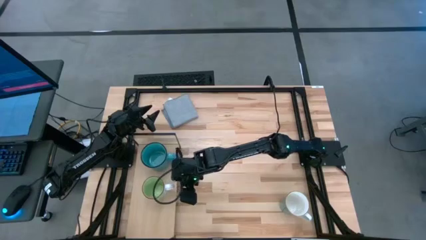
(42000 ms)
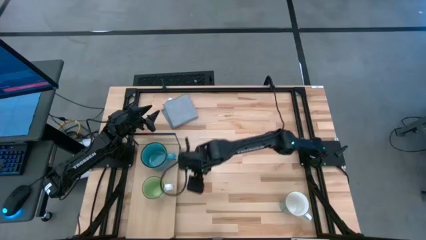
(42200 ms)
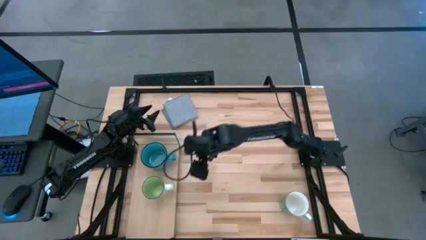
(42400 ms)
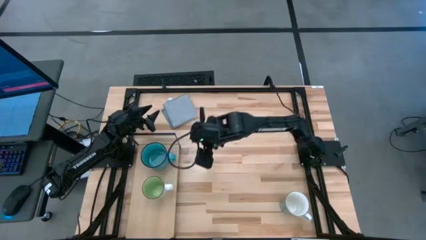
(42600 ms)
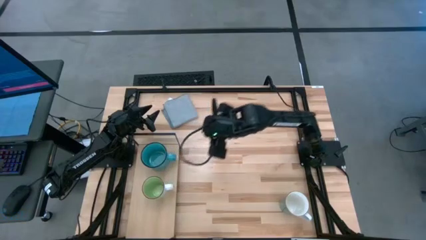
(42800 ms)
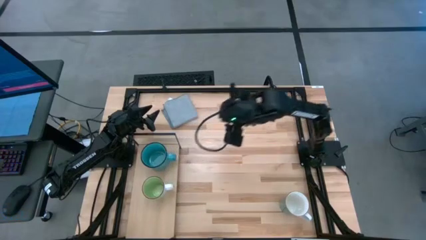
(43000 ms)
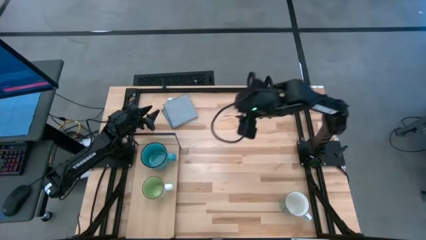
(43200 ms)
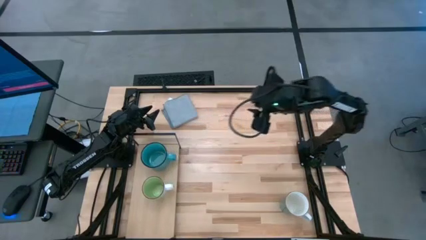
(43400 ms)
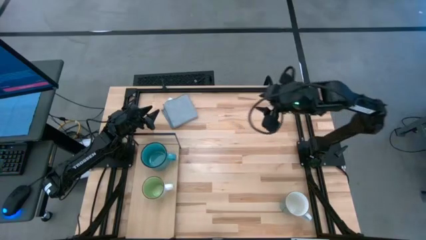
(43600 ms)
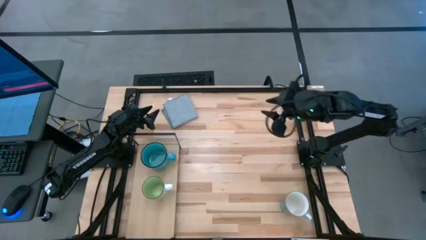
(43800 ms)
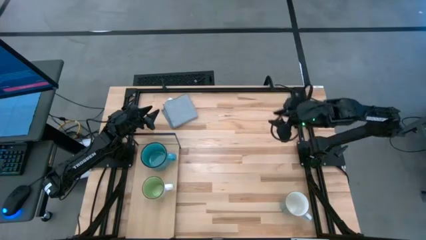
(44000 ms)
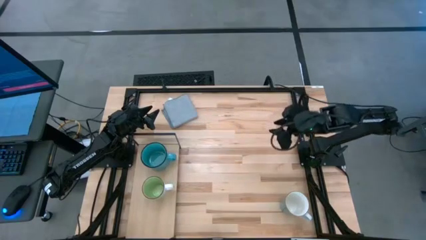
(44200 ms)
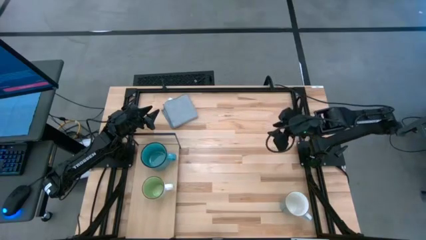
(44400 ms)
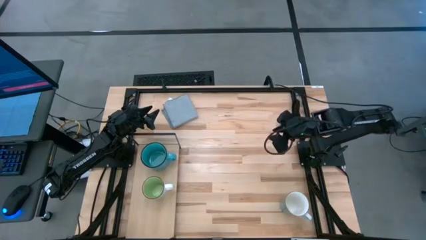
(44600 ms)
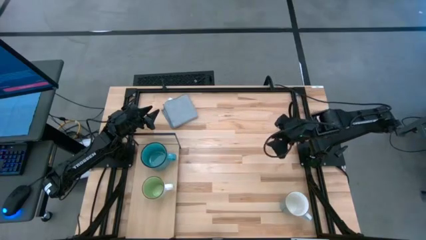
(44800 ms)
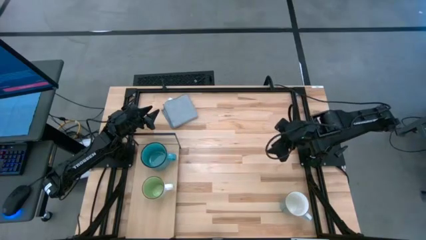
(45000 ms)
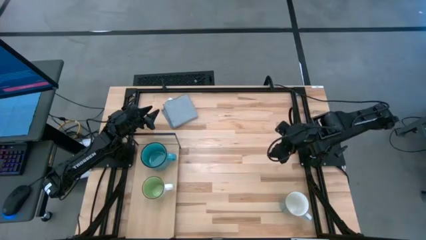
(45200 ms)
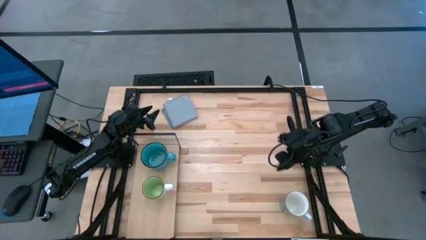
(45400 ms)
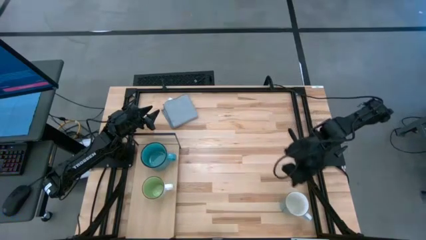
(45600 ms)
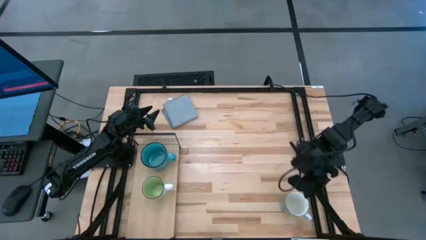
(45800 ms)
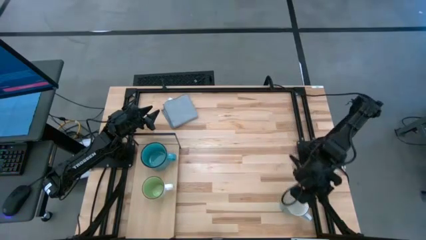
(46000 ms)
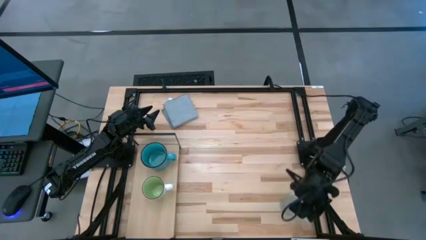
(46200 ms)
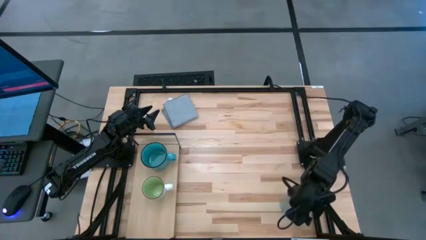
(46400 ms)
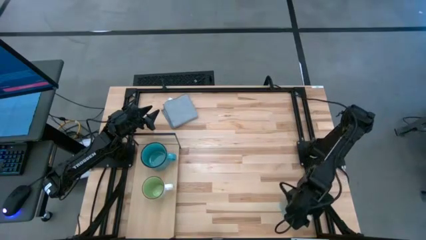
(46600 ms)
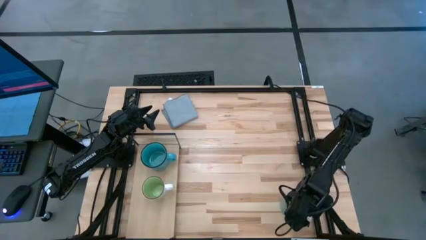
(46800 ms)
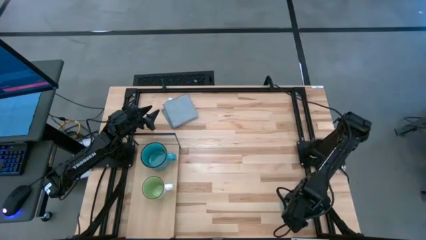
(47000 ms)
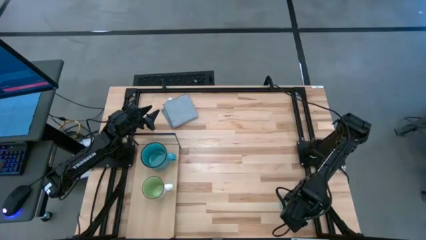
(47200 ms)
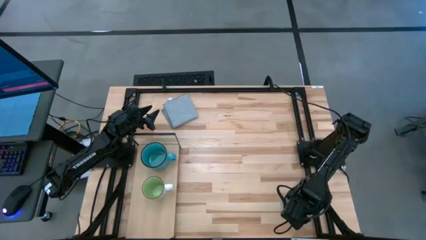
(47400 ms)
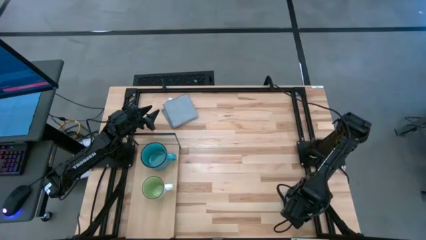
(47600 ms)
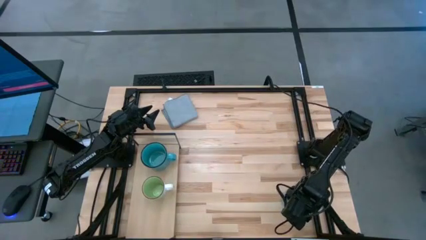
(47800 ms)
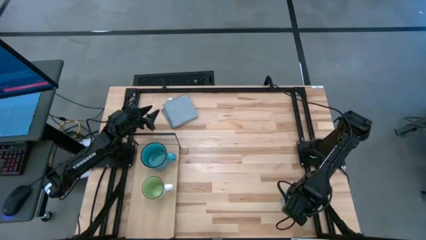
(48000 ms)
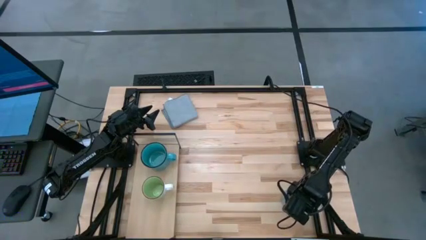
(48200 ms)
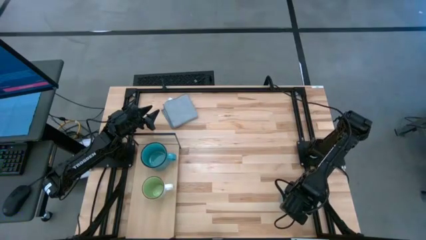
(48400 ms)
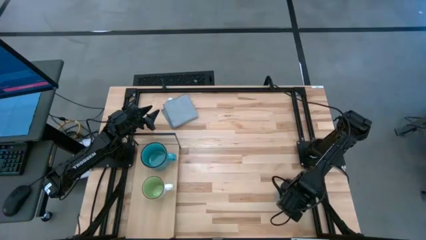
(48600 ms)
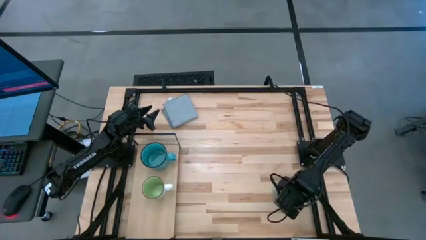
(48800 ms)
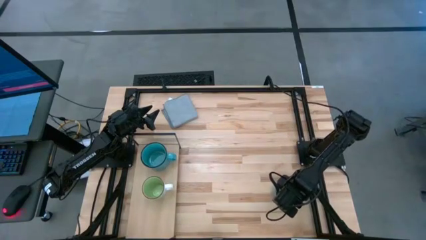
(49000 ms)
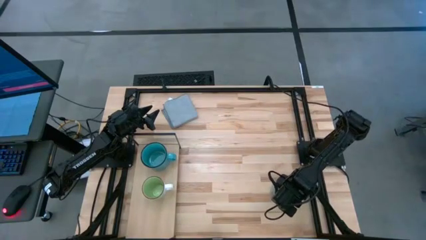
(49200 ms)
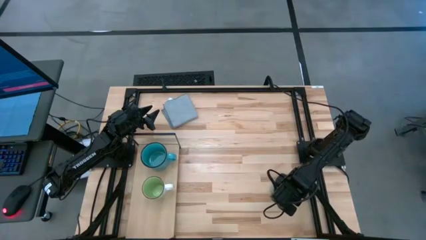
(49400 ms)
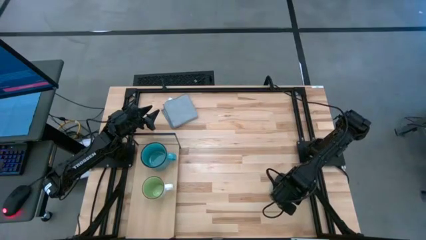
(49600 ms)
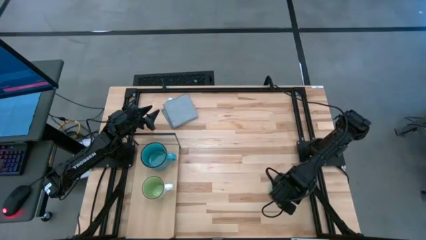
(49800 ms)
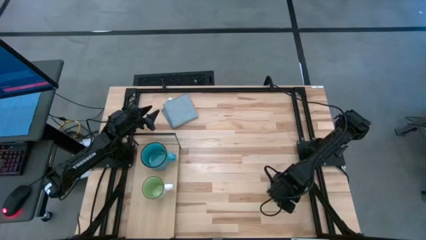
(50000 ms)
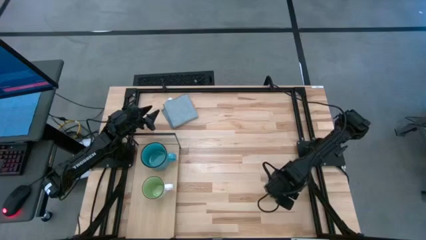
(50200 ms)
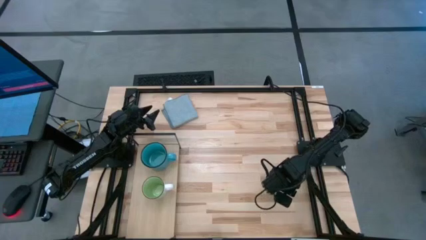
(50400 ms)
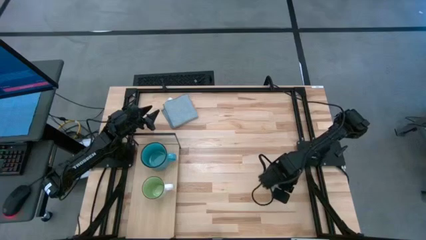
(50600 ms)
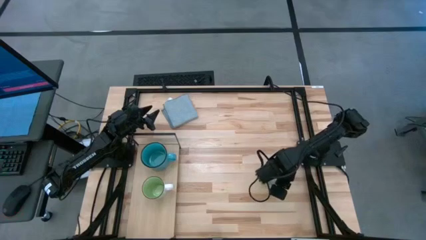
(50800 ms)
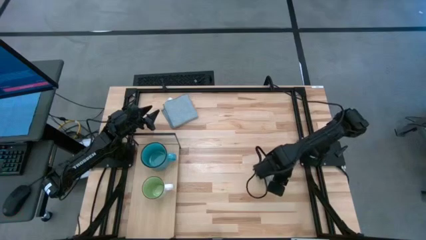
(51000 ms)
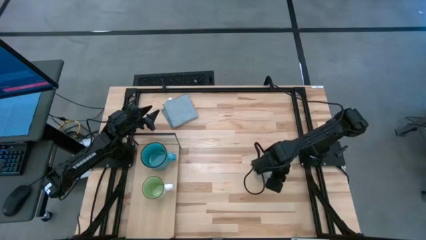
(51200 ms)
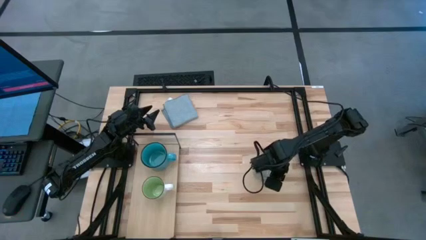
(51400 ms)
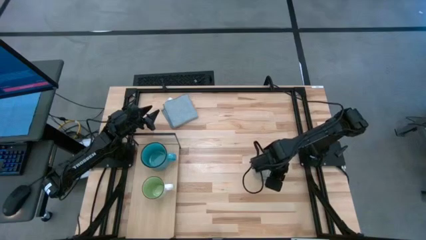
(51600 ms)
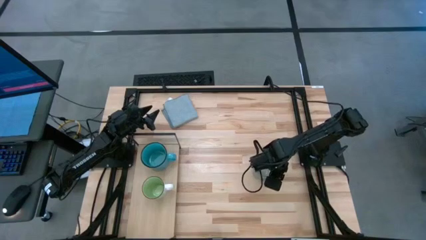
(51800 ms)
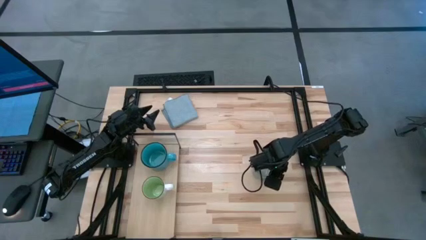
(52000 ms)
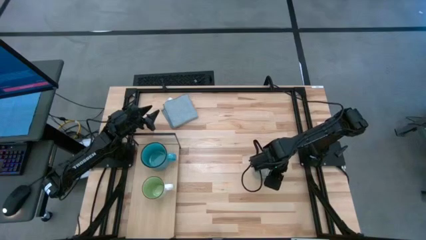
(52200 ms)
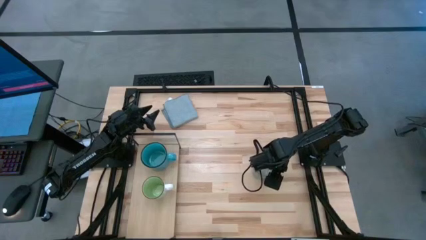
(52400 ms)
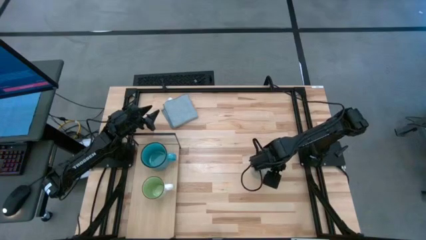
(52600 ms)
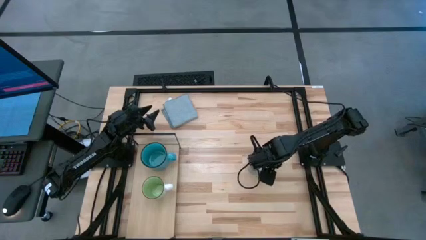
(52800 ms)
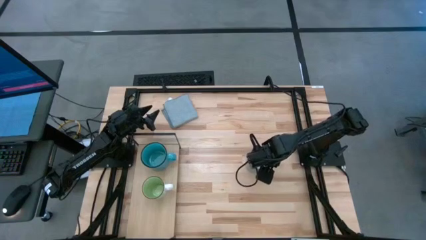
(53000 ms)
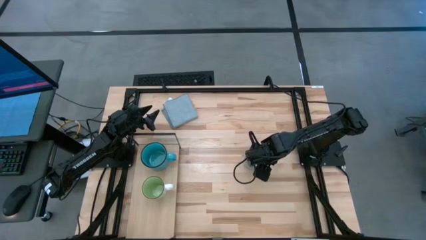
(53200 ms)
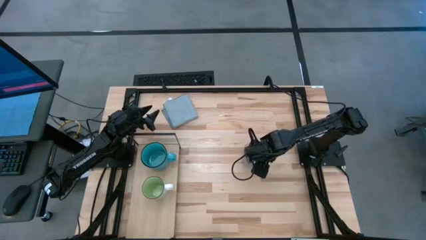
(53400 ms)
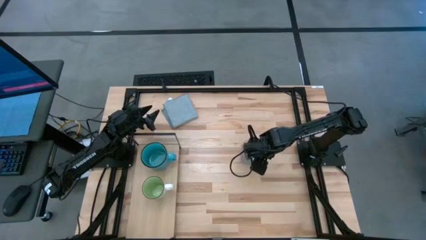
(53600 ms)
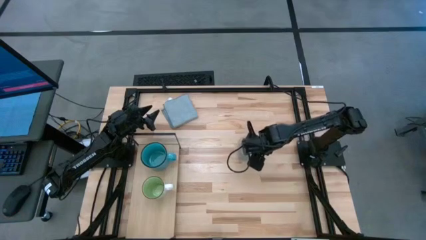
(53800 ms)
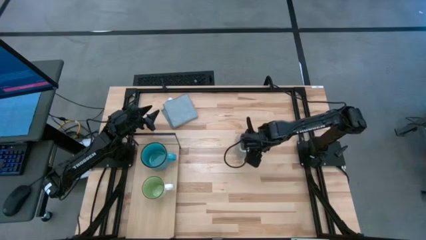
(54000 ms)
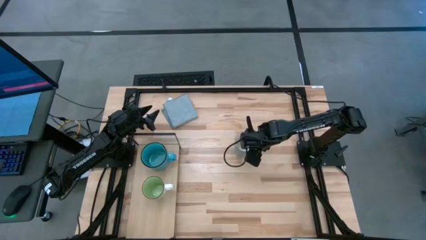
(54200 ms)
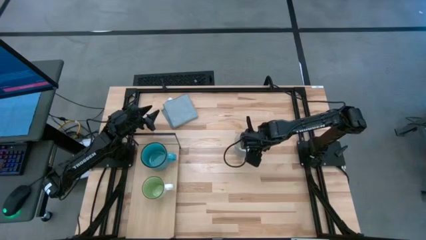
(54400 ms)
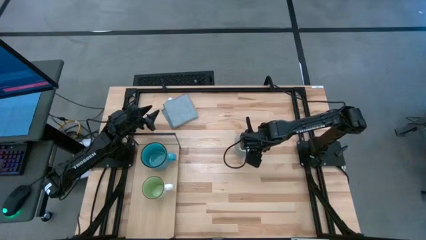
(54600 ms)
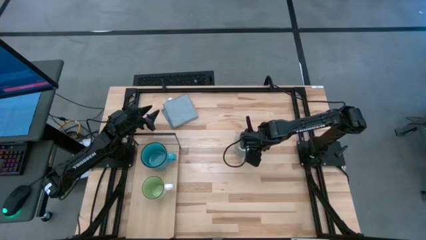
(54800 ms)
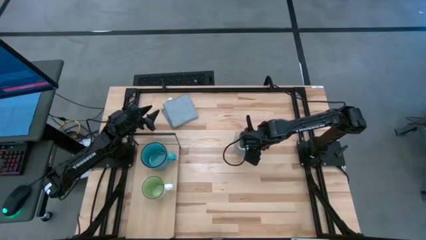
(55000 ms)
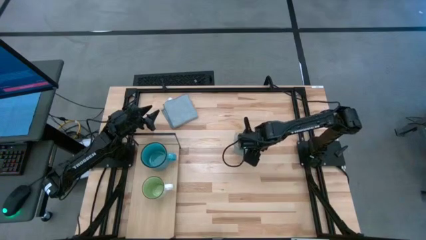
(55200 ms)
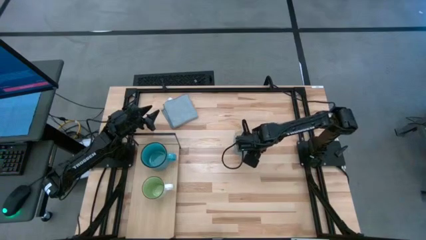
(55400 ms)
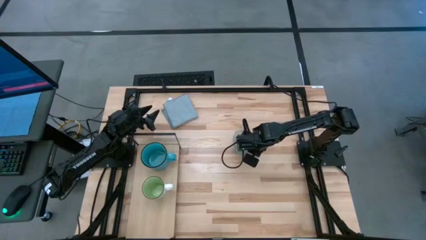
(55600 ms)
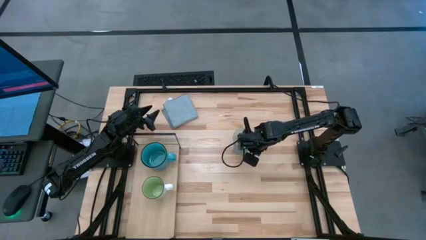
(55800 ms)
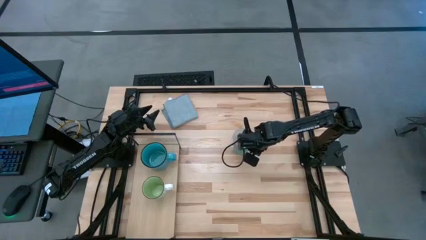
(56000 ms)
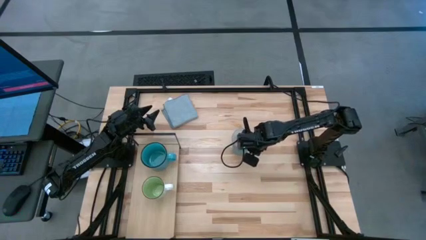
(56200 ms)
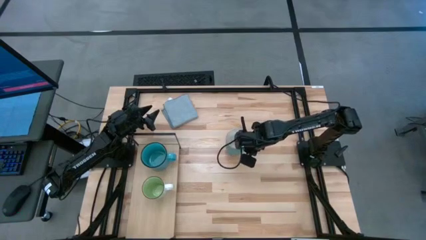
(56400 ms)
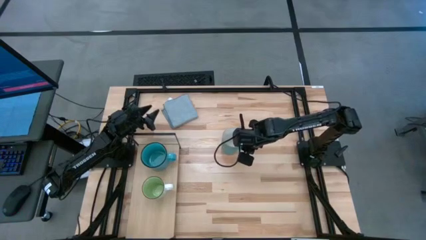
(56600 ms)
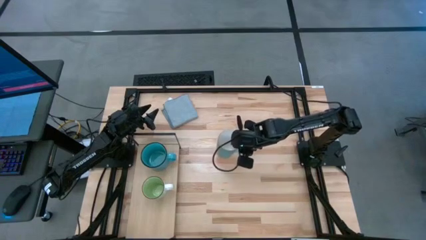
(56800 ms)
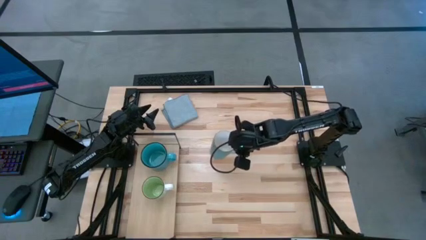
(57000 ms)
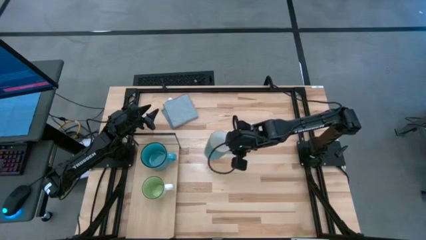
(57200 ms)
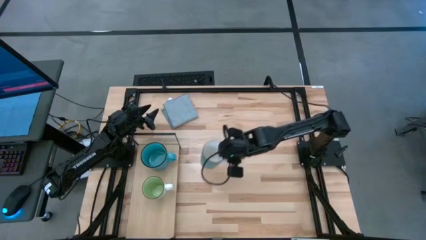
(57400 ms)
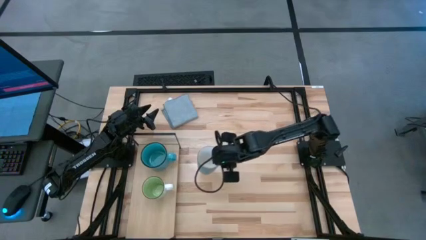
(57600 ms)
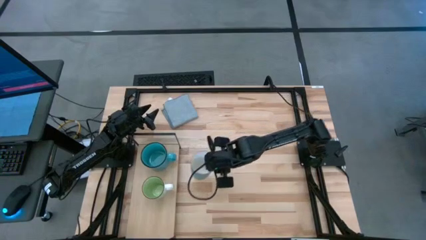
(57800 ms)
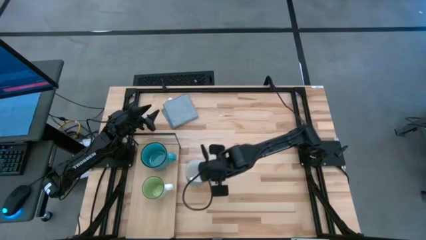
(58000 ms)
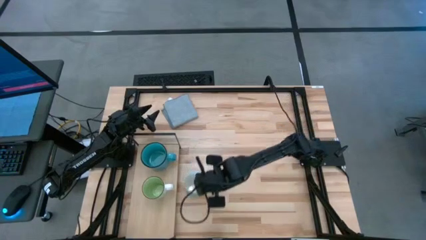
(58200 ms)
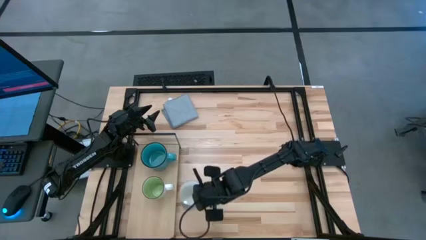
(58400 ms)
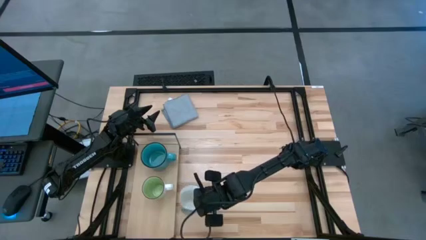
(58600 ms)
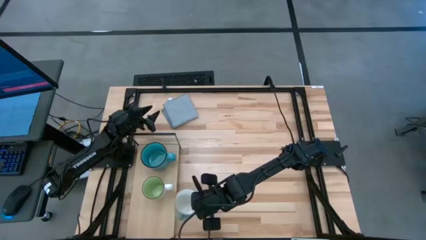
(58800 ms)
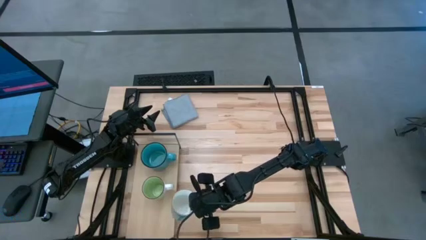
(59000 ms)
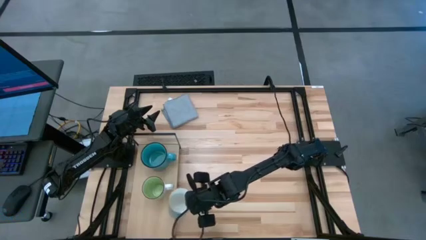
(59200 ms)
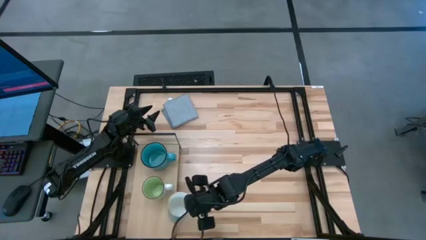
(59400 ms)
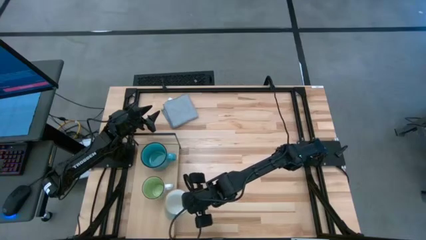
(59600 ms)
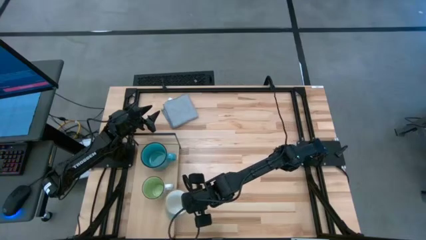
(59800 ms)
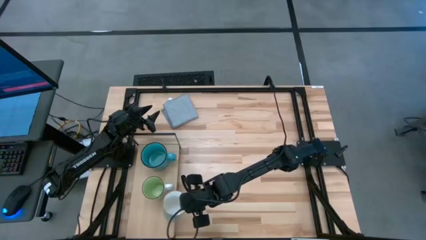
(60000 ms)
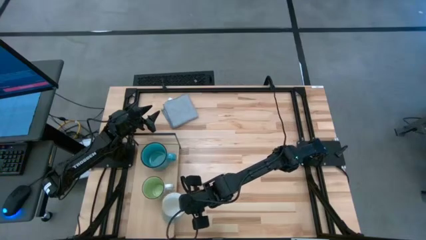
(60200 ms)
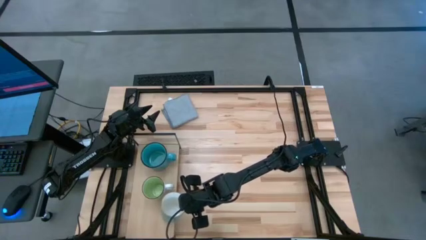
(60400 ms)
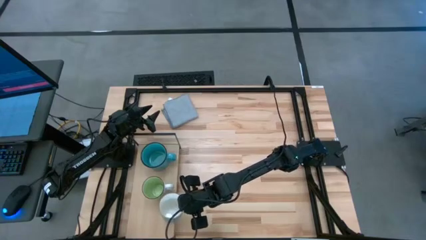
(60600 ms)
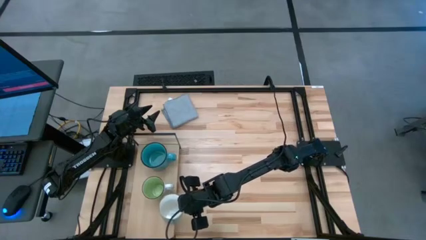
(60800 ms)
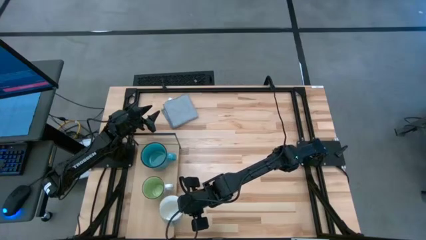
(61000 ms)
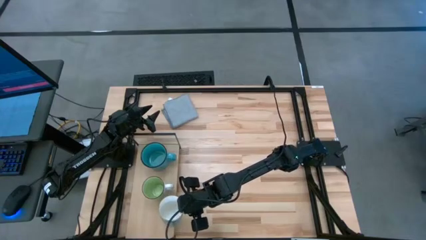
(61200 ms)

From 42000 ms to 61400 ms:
Task: Stack small to large cups/mugs on shelf
Put the blue mug on the shelf
